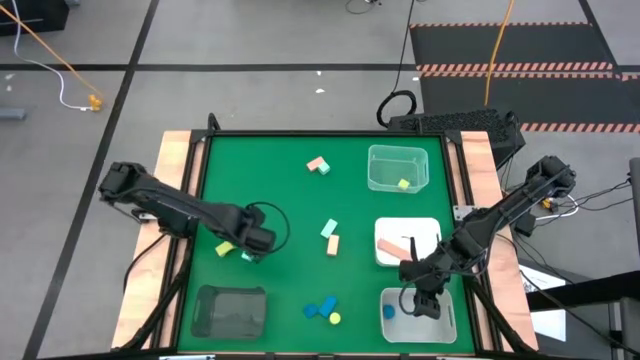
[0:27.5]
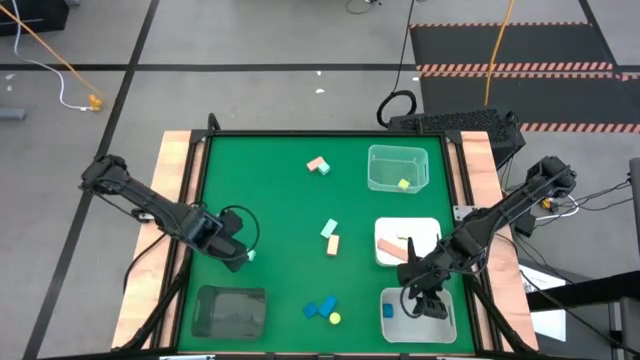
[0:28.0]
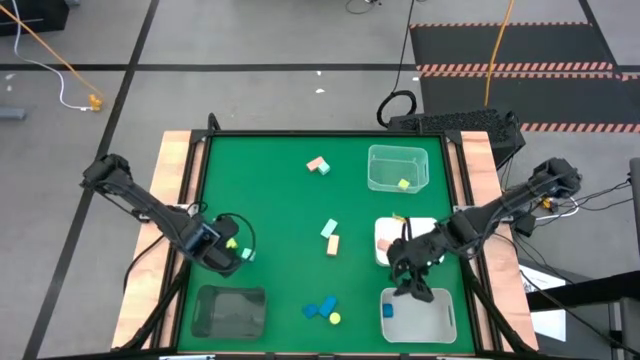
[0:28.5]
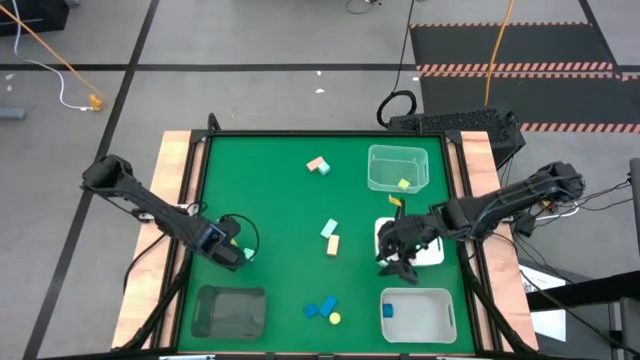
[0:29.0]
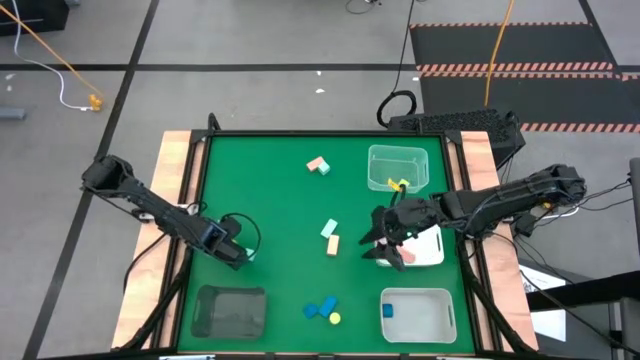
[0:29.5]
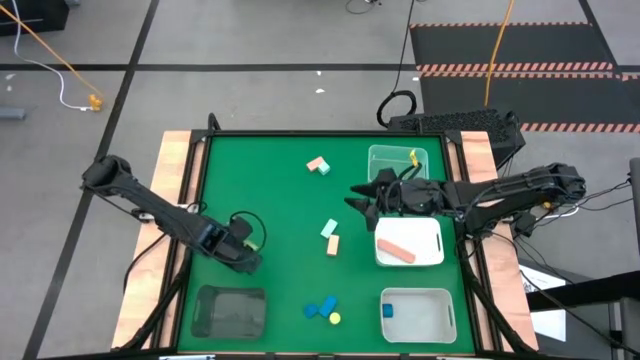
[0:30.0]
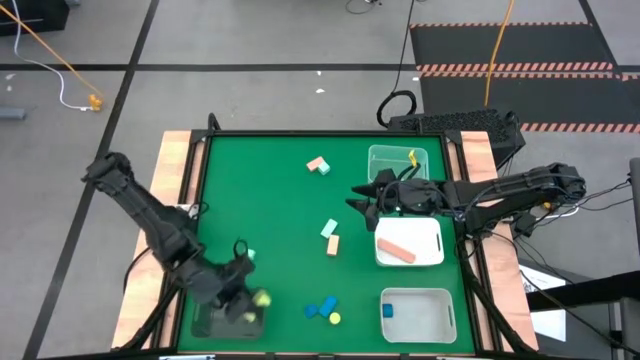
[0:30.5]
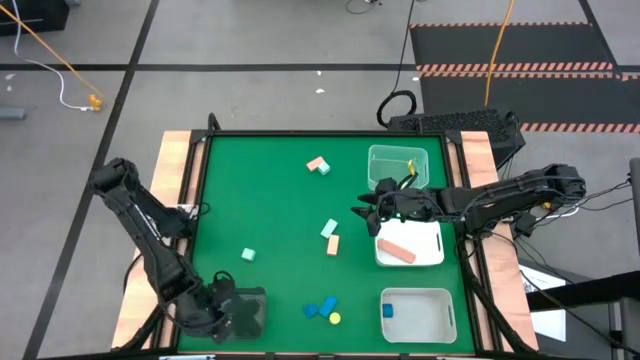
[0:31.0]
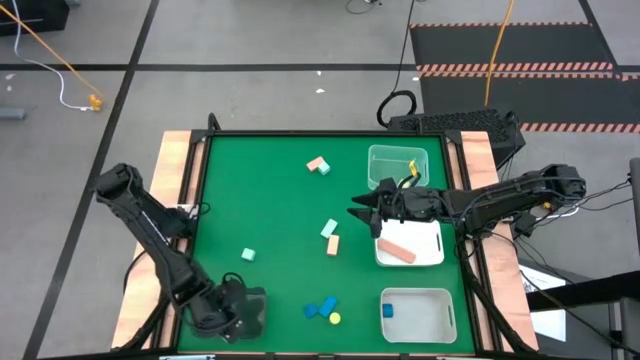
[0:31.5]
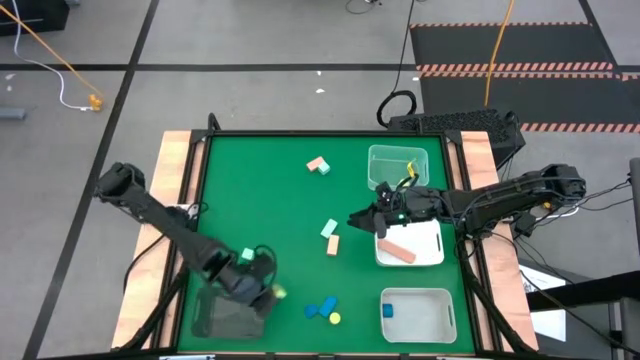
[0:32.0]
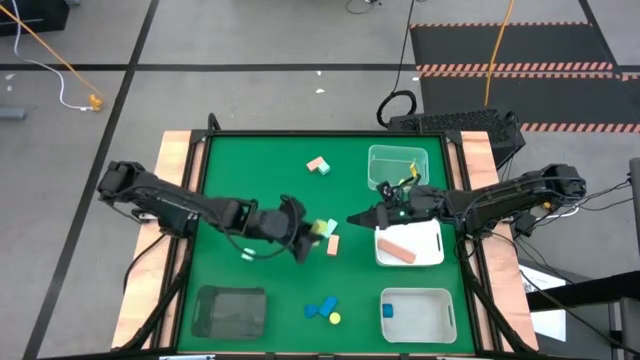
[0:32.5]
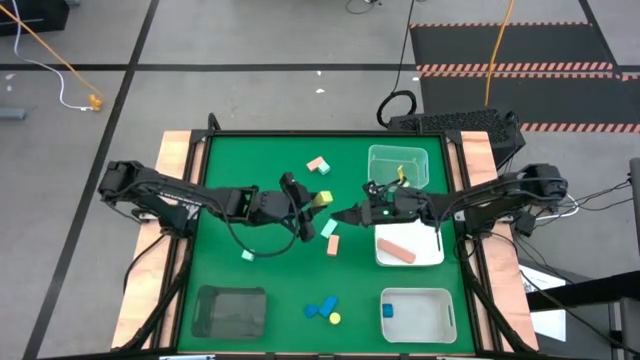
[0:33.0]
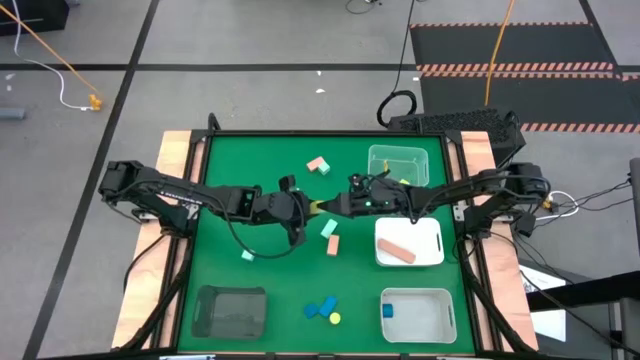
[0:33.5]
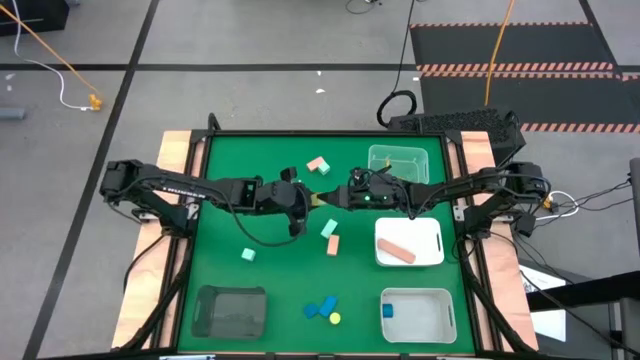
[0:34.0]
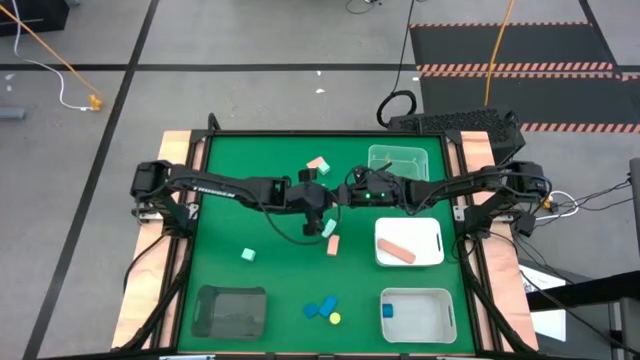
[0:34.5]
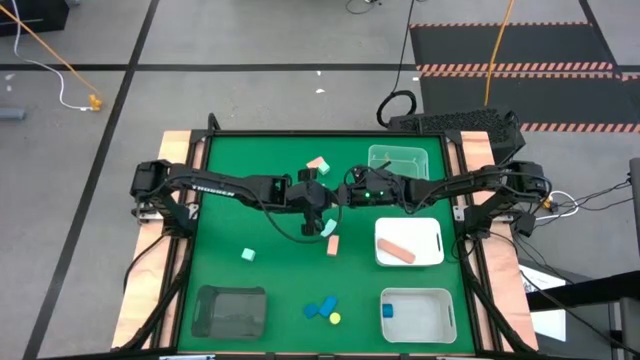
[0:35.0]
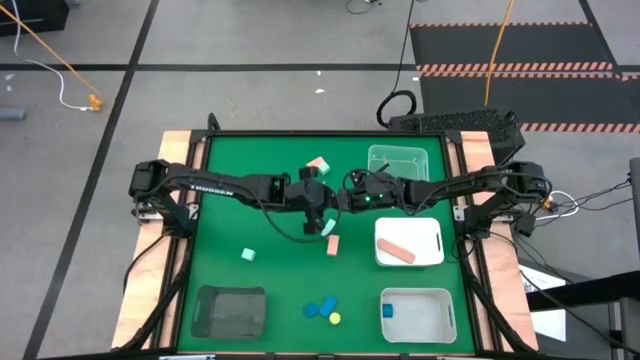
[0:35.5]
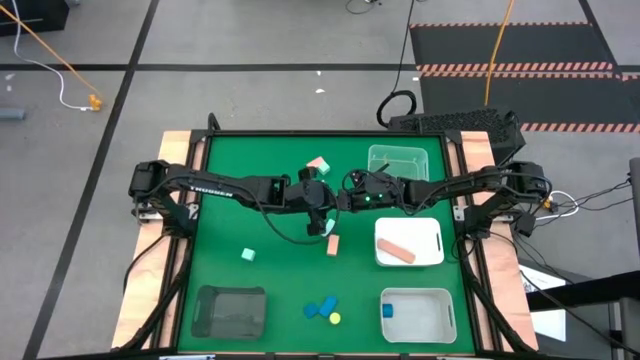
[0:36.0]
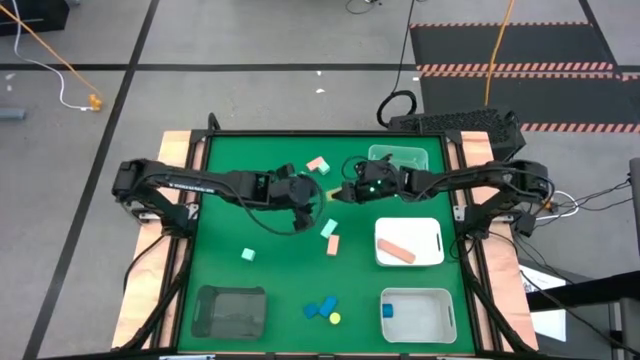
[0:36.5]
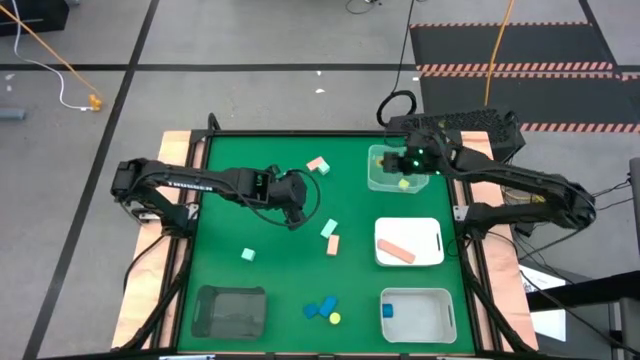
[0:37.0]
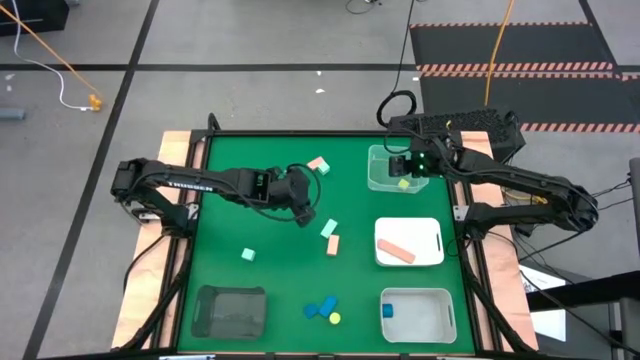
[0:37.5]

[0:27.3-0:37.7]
Task: Sort & place blocks by color
Put the left yellow block into the transparent bin

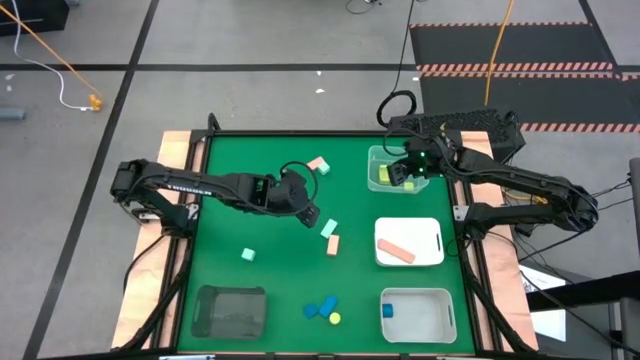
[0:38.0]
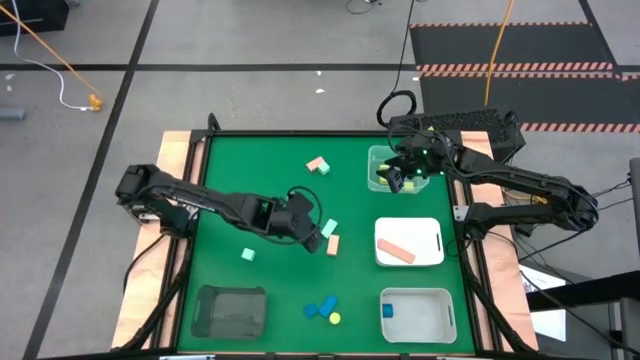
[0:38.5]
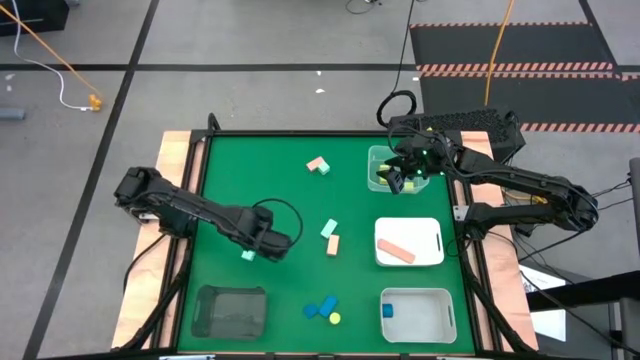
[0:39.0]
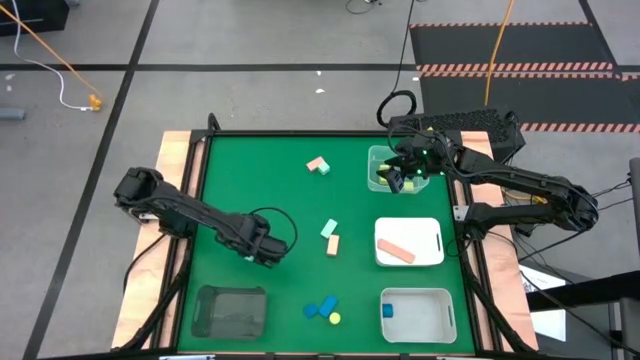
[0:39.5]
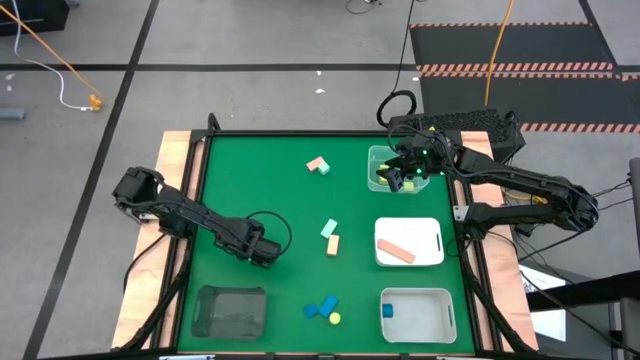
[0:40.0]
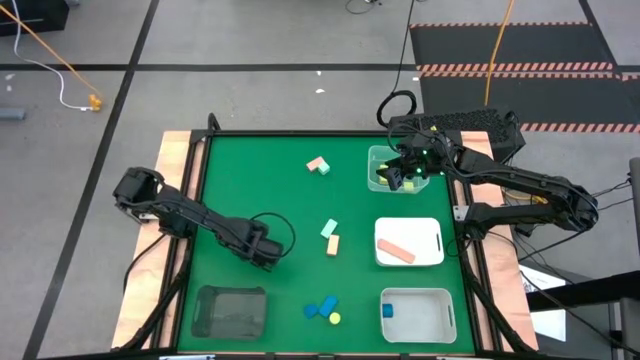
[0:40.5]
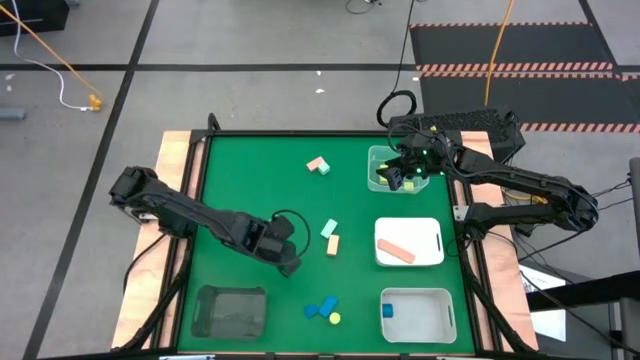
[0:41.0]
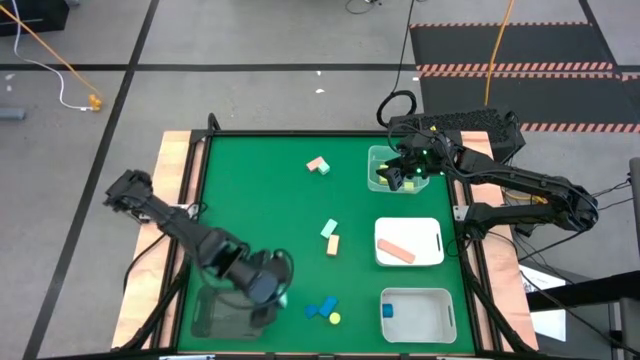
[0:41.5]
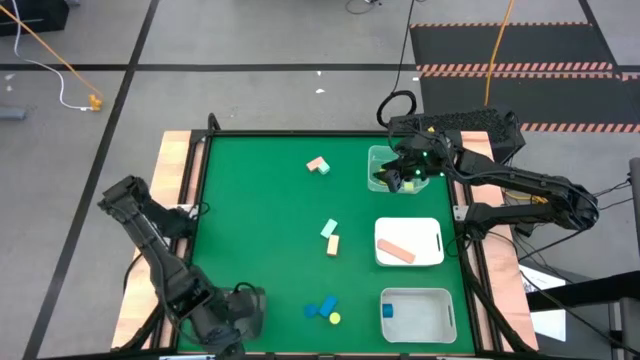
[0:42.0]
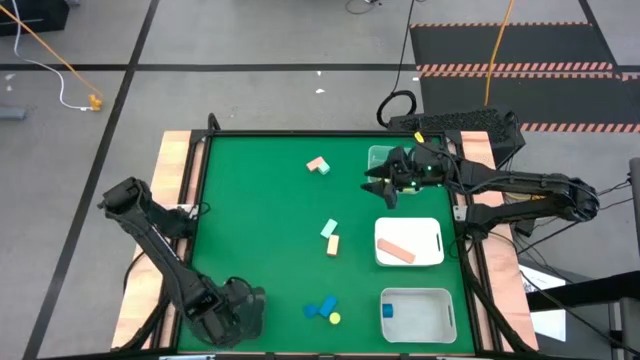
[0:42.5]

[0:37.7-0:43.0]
Put the bottom left light blue block into the black transparent bin

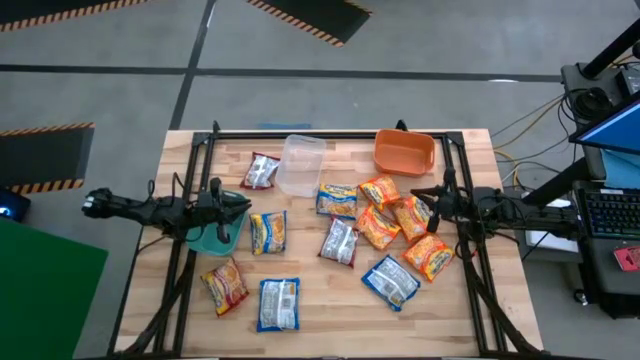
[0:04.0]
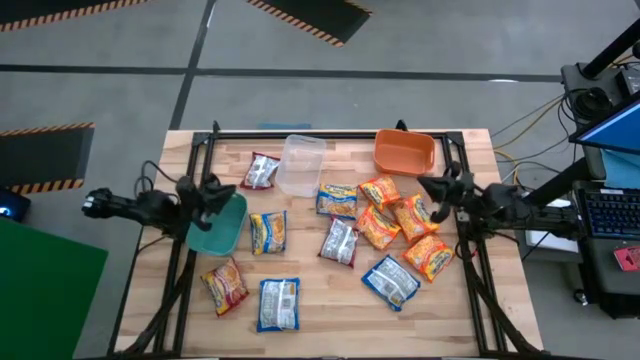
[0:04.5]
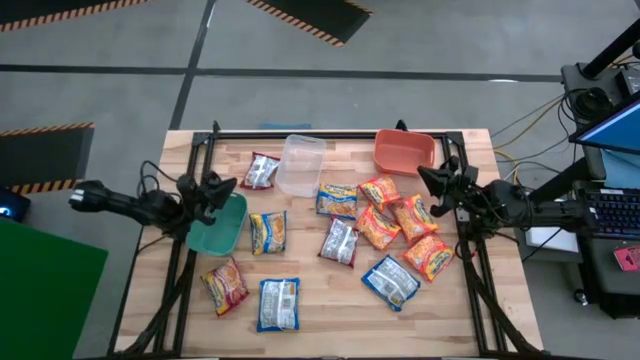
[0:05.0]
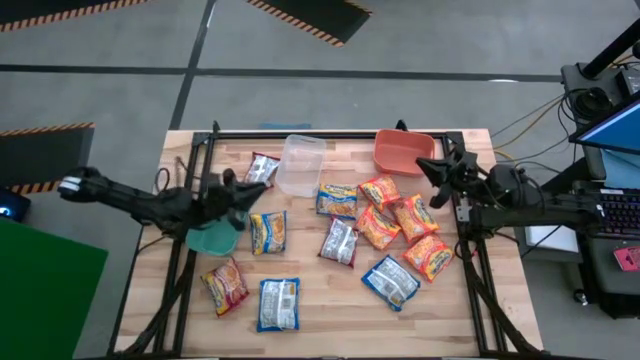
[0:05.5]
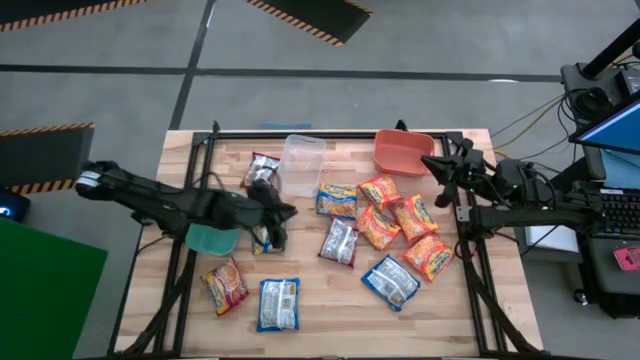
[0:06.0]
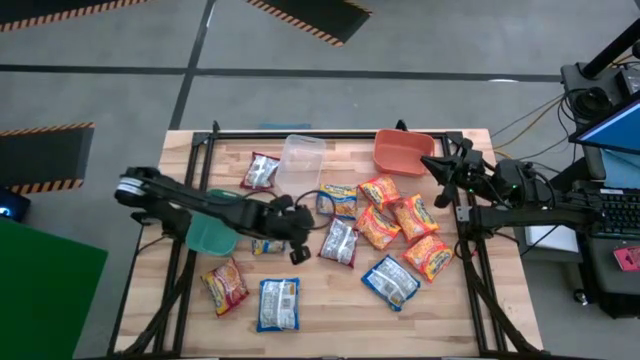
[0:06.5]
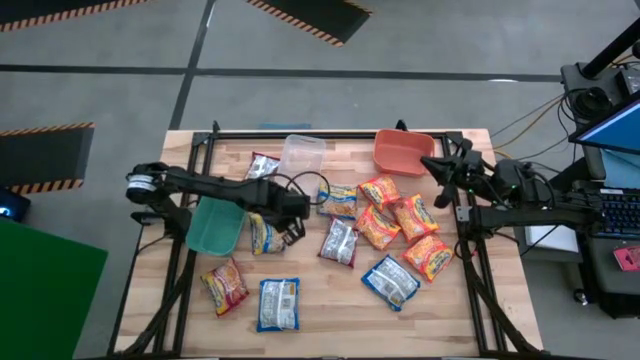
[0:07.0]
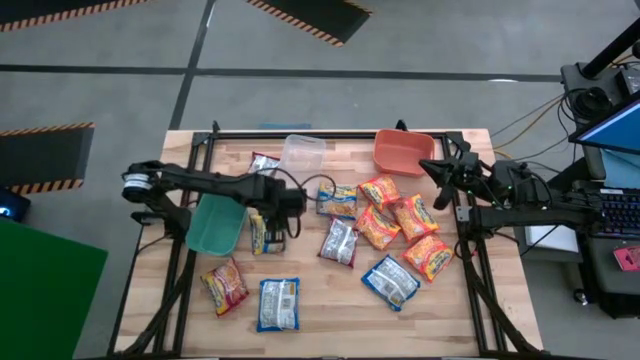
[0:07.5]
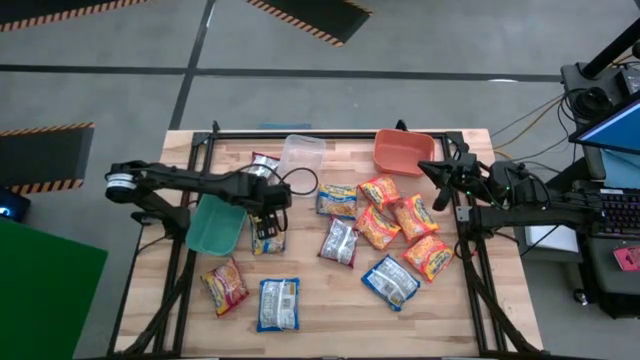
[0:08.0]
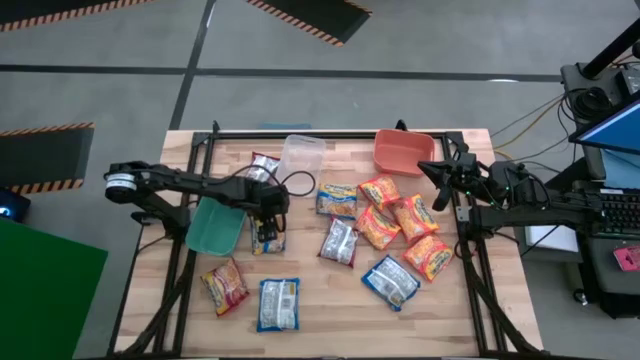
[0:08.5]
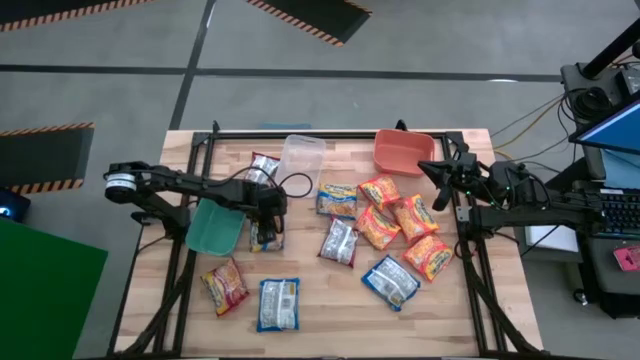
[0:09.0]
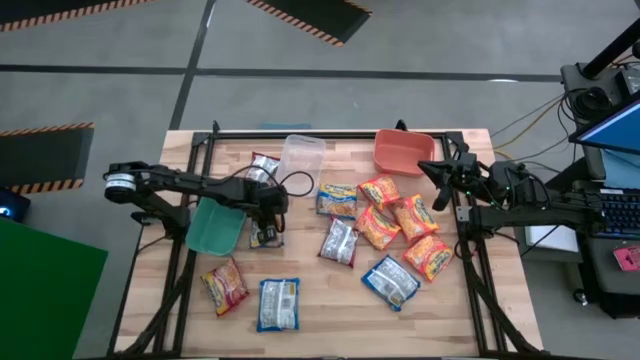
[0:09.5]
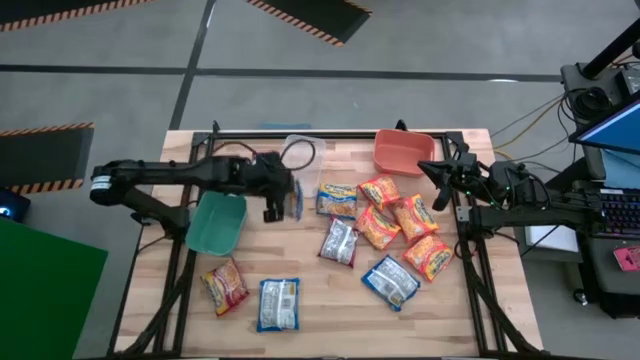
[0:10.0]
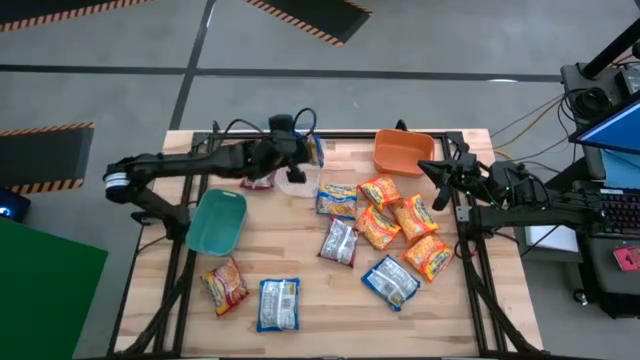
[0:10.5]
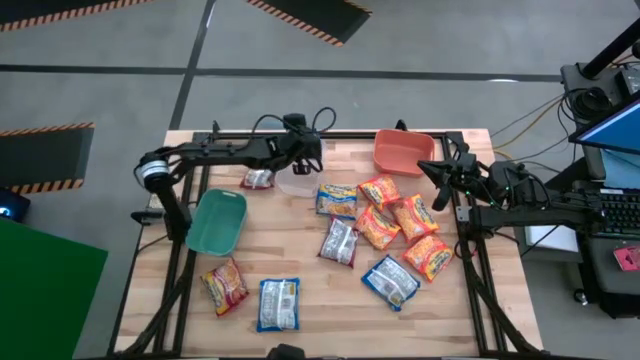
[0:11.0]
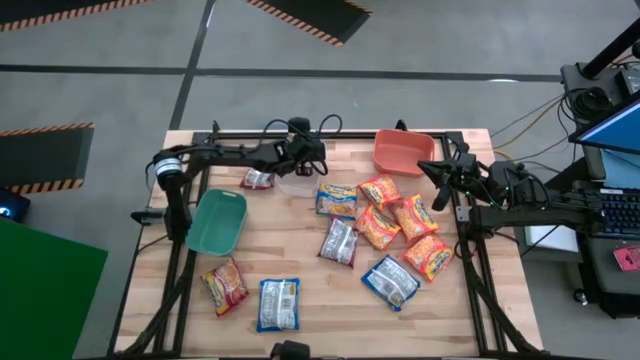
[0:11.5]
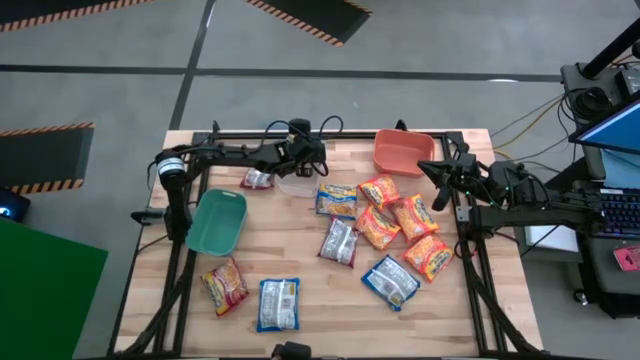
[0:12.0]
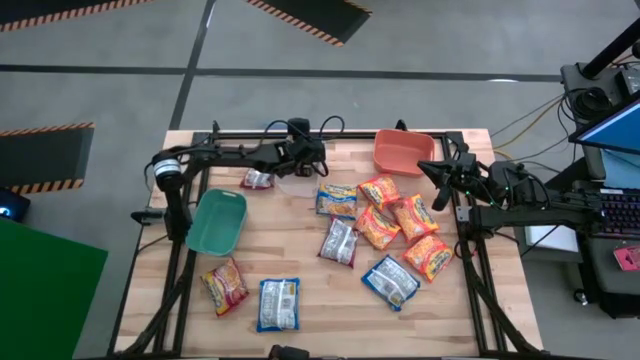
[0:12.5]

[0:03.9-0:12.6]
Task: Sort Maruchan noodles
Put the blue noodle pack into the transparent bin
